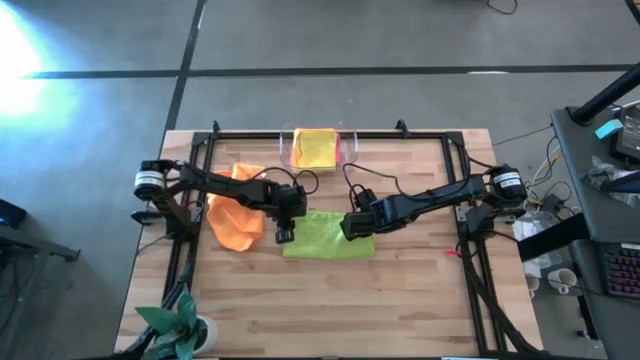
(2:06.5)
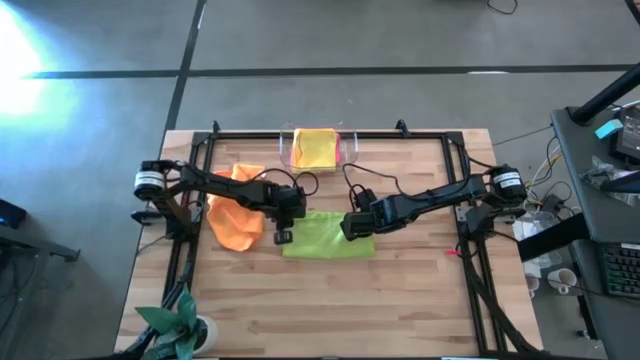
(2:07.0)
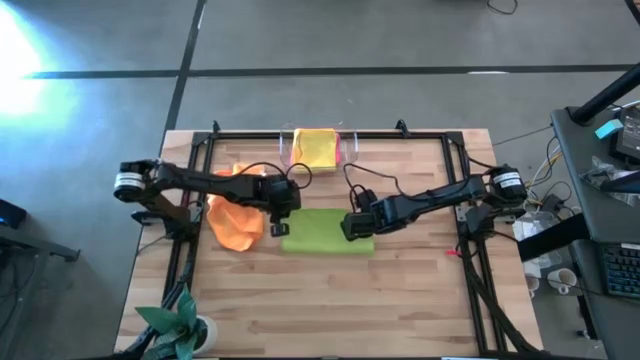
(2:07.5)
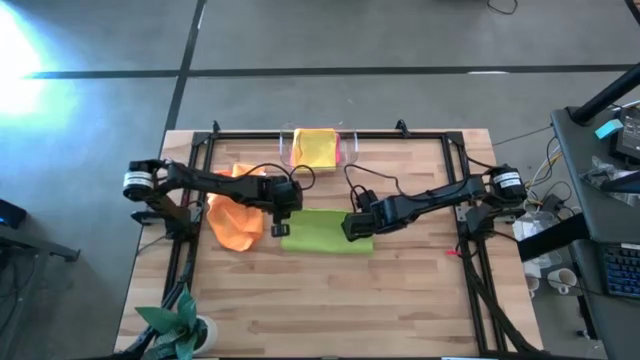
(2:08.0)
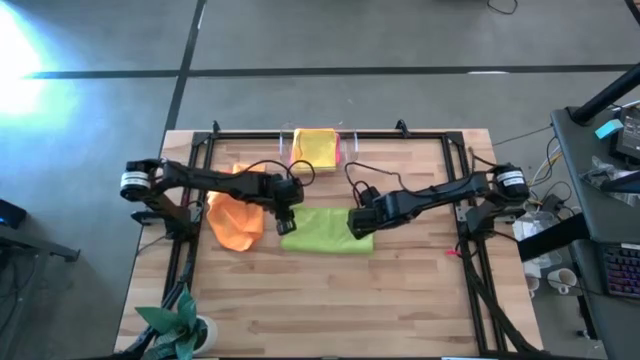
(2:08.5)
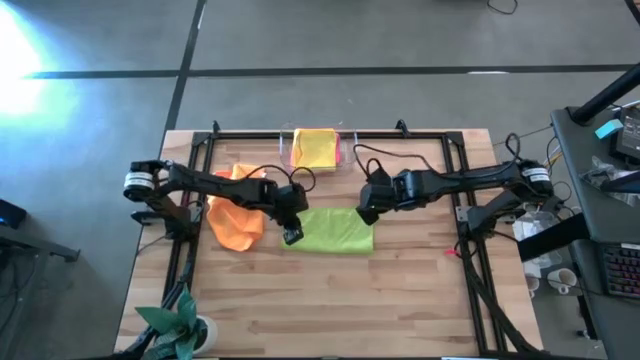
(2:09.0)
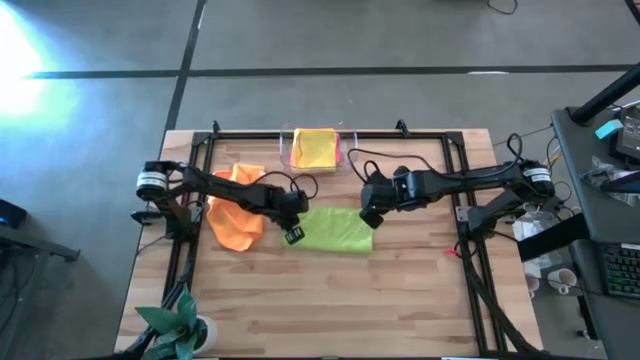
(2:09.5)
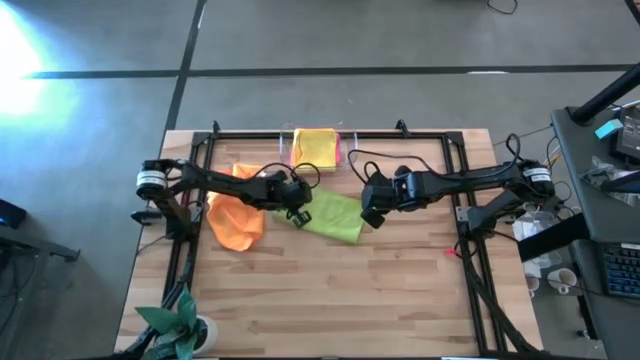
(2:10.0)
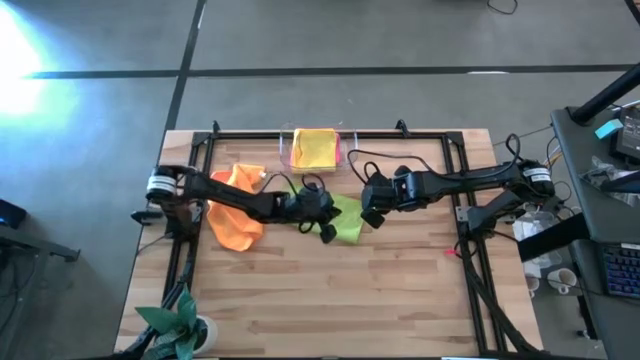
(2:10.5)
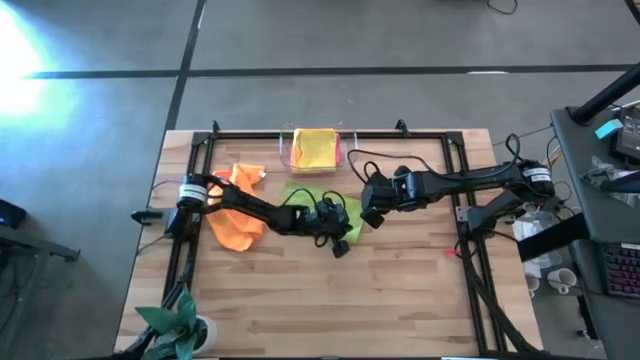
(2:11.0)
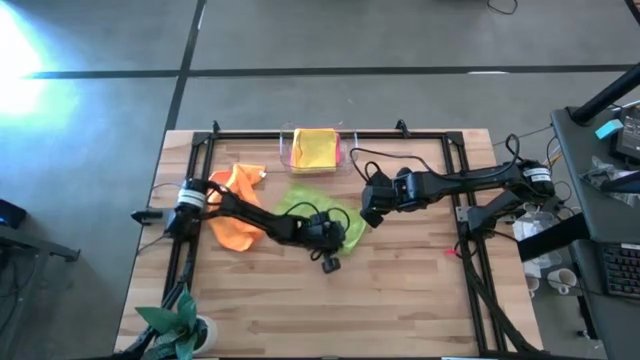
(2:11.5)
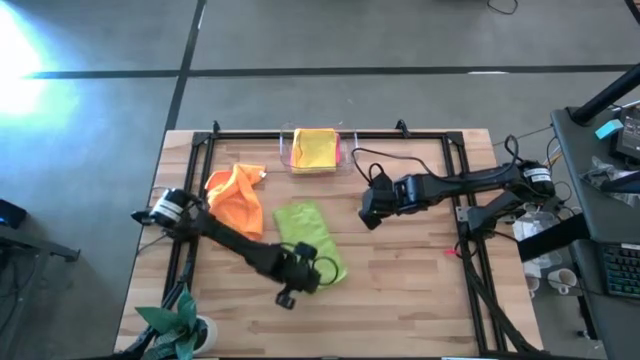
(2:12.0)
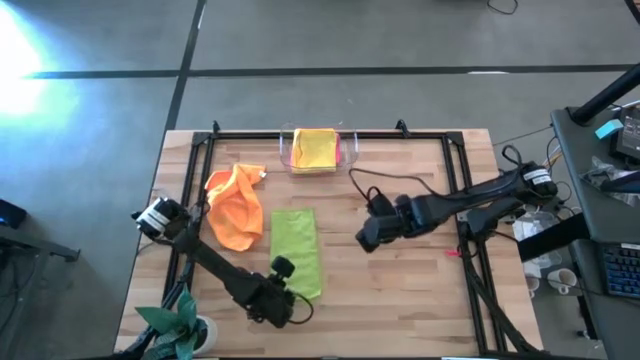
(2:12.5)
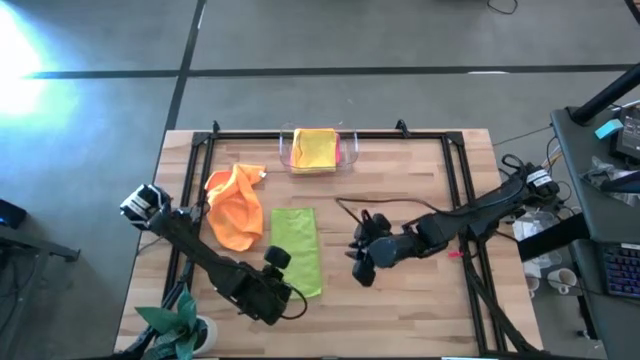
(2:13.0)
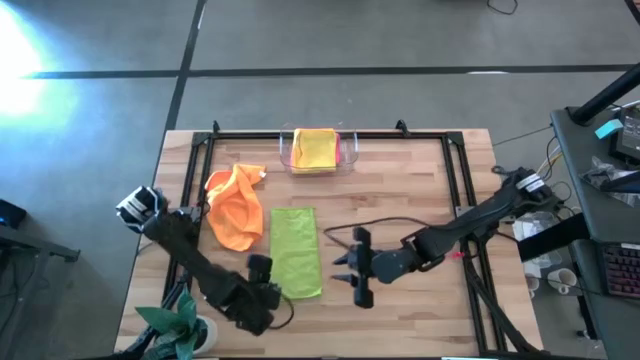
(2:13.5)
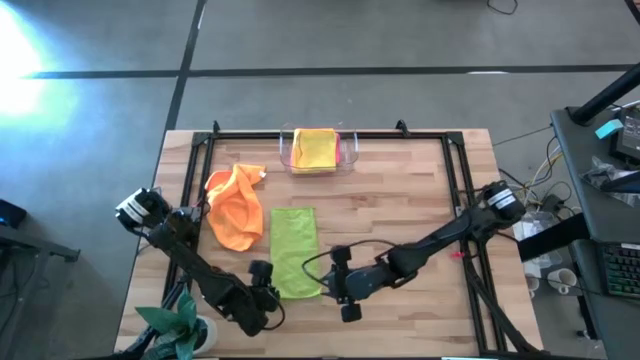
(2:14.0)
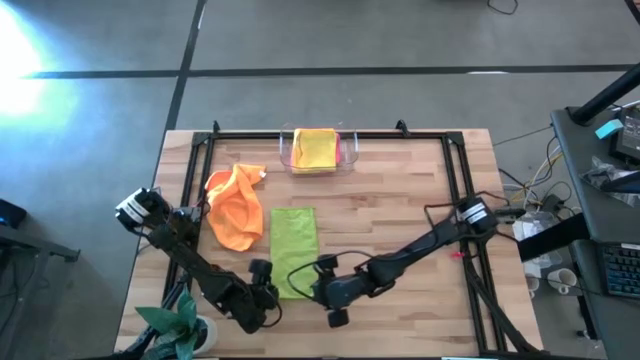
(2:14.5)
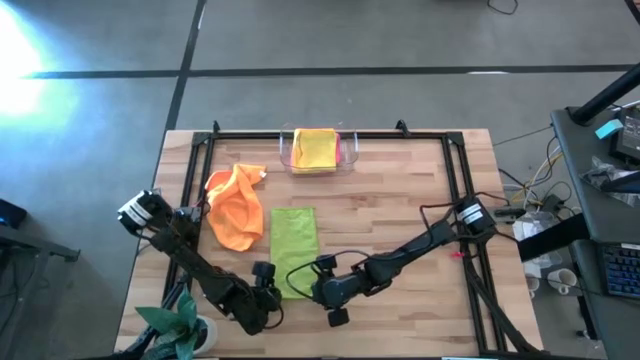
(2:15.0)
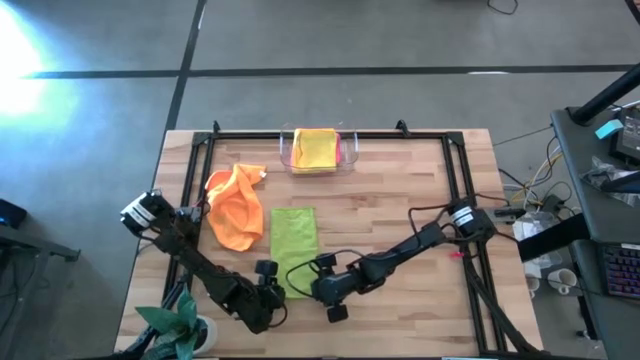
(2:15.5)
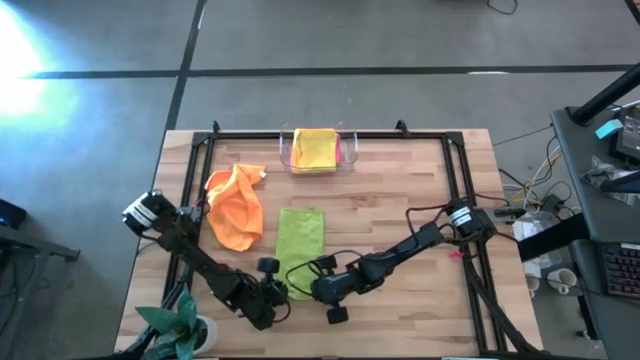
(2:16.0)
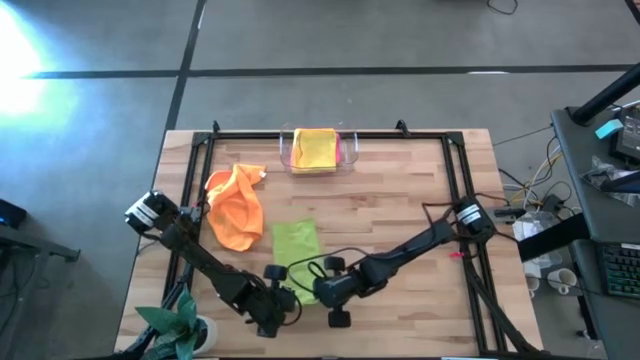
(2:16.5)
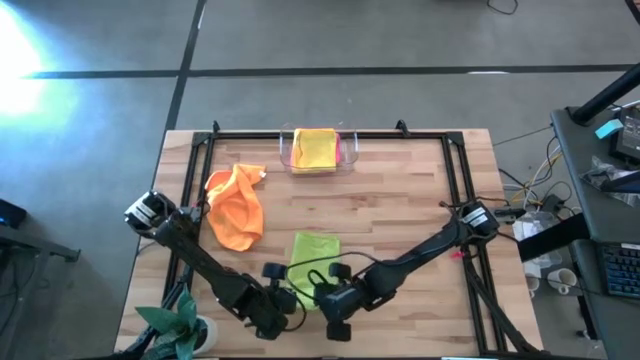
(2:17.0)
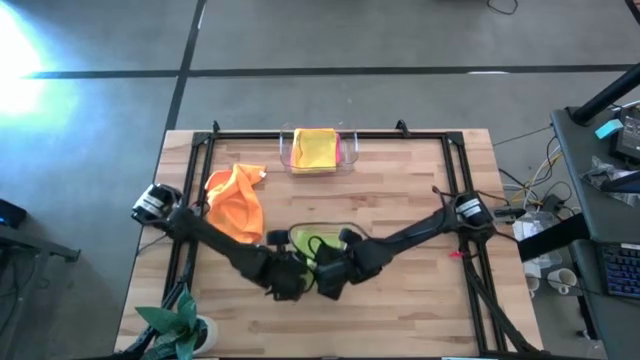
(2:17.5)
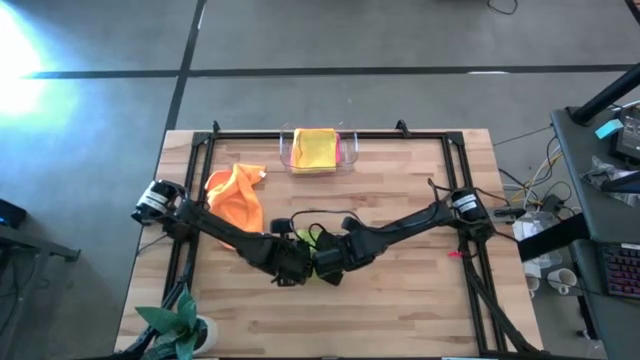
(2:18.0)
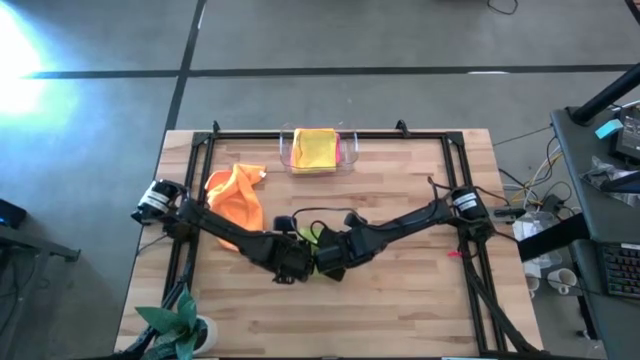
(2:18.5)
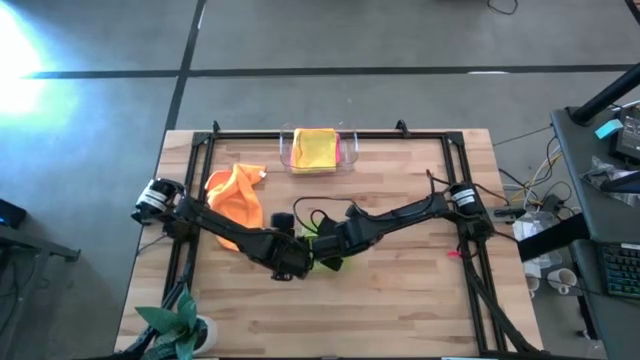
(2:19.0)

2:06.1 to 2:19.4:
Task: Fold microfiber towels
Fold the green microfiber cloth

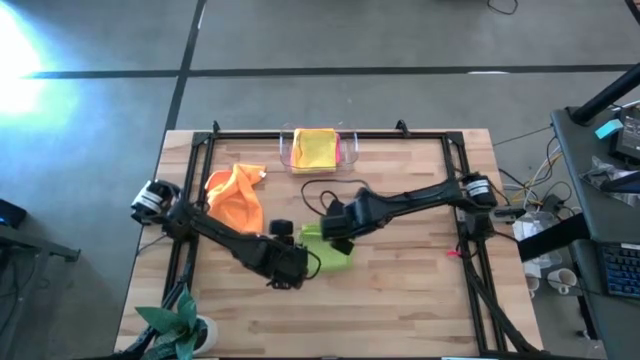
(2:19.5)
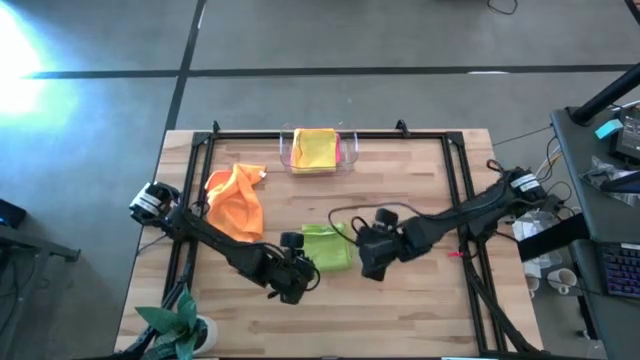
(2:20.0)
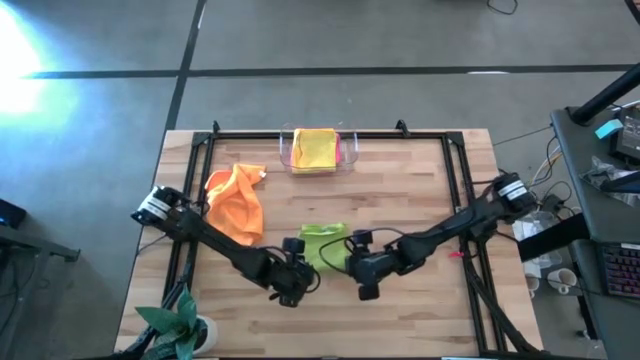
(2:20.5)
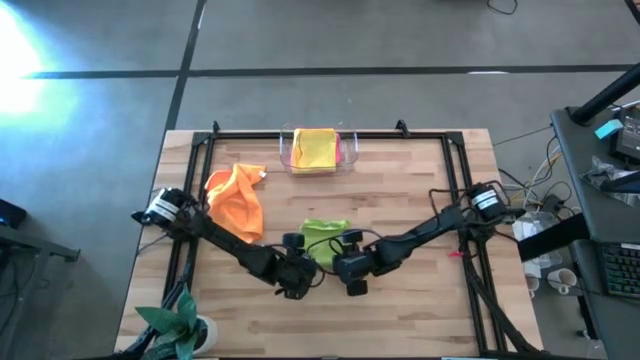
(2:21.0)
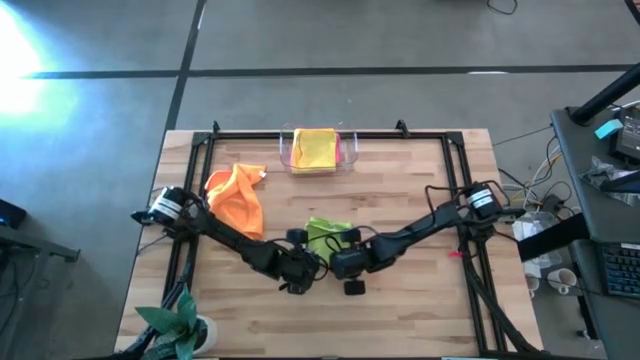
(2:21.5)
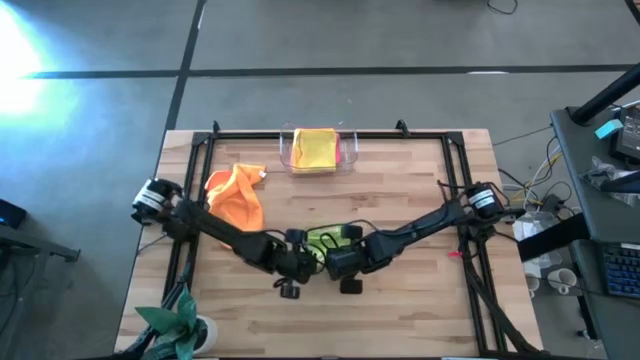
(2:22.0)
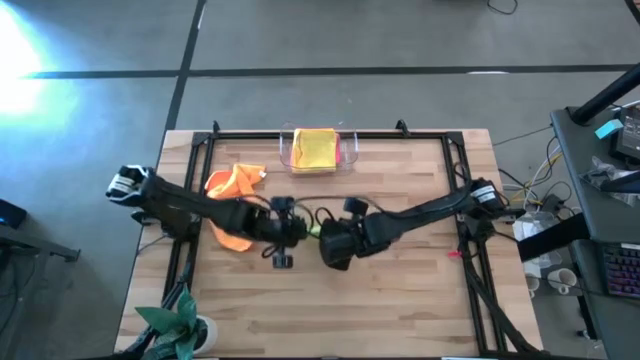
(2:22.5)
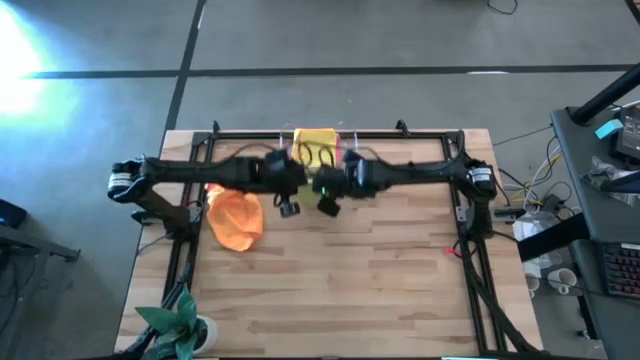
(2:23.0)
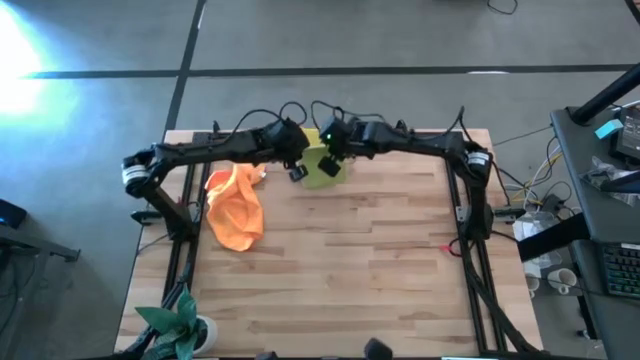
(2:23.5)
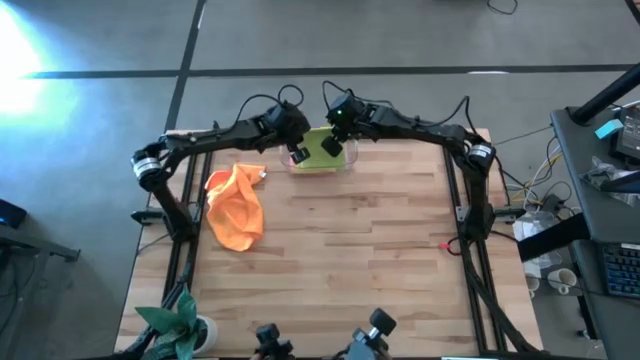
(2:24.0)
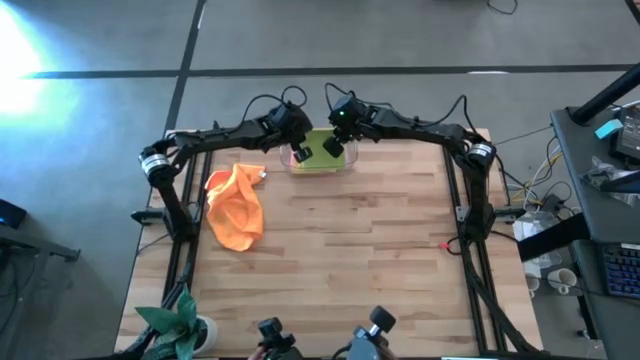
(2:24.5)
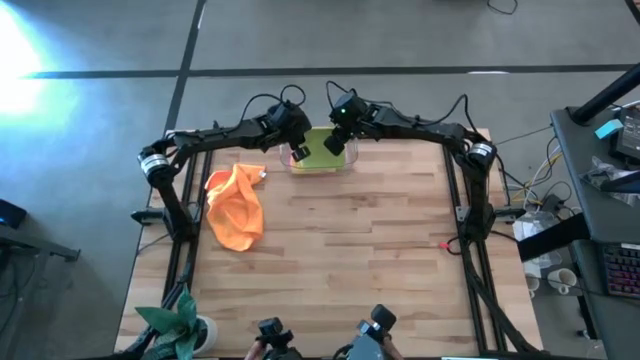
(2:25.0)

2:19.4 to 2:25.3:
Put the folded green microfiber cloth into the transparent bin

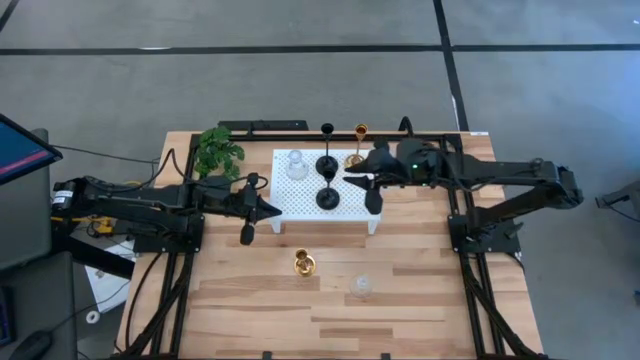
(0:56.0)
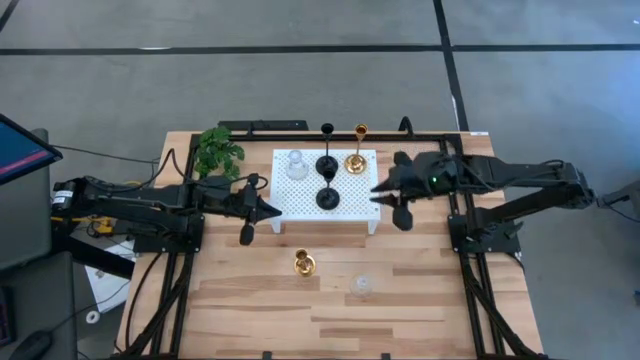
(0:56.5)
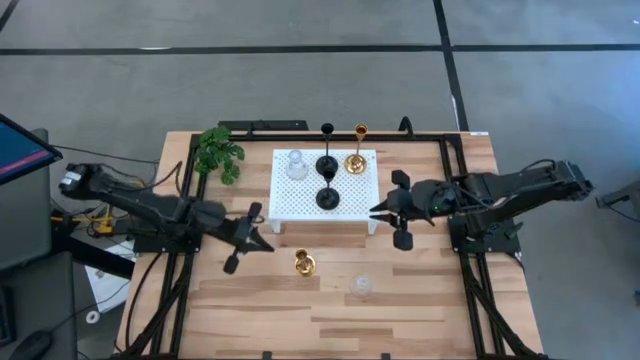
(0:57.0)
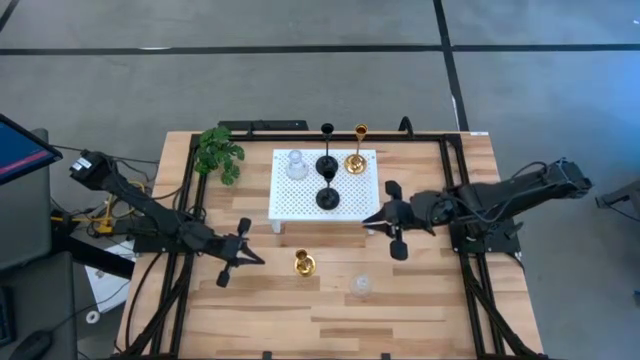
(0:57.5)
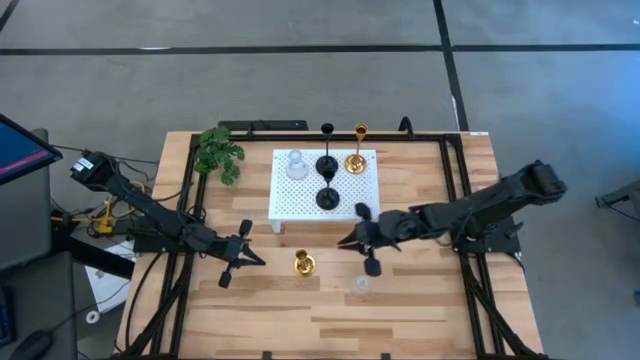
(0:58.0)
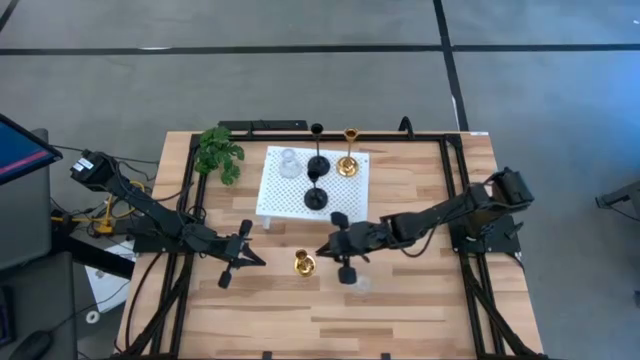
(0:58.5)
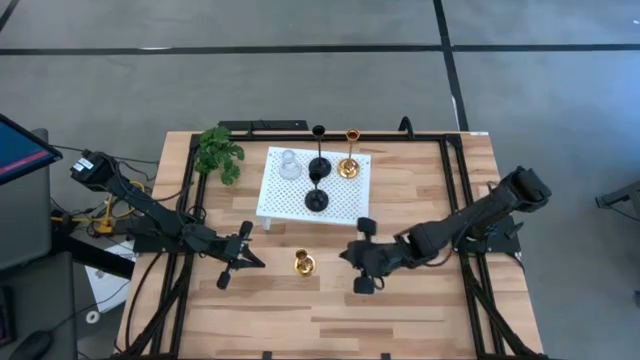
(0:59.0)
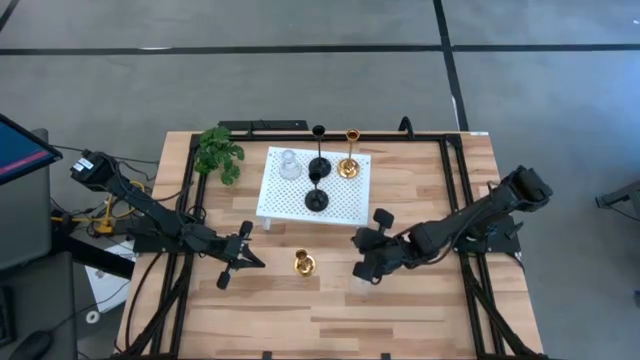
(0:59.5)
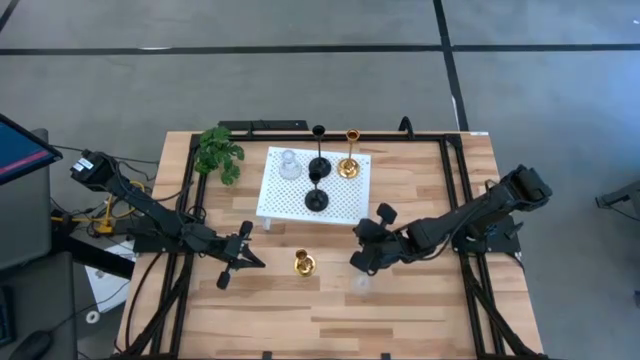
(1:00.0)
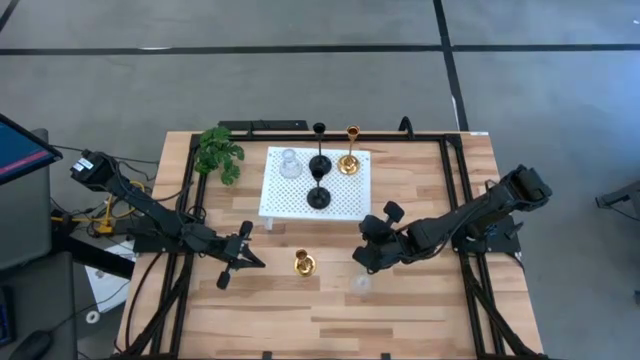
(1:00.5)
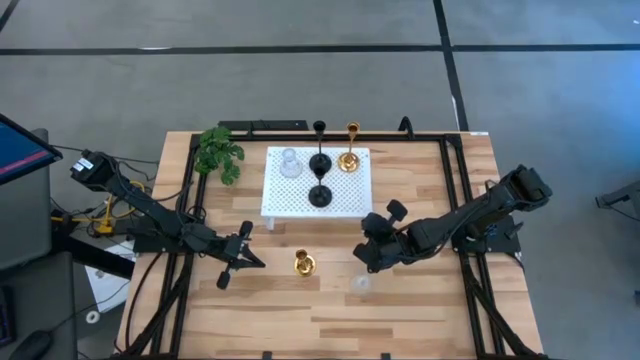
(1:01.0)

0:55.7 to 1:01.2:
Task: Pick & Place candle stick holders
Adjust the shelf
